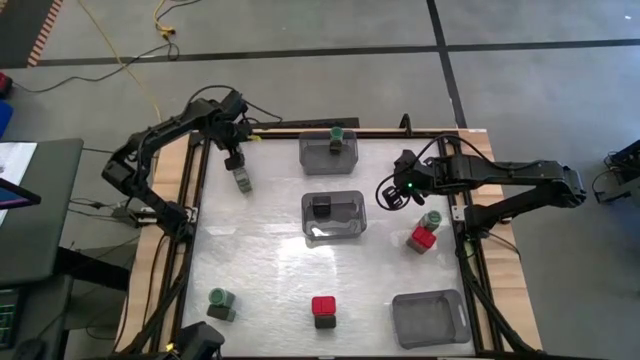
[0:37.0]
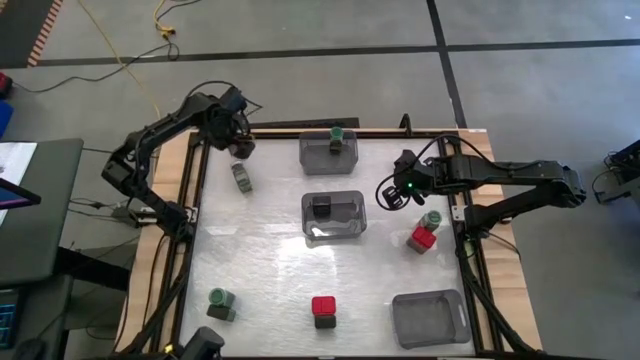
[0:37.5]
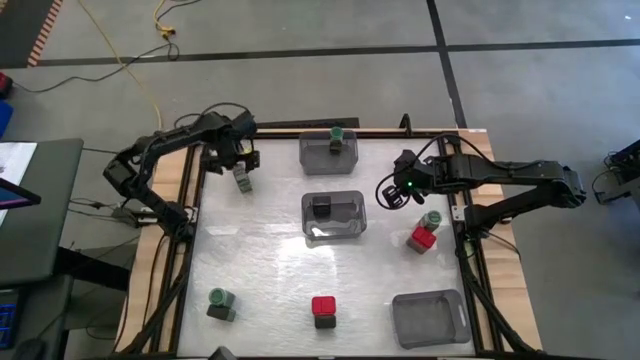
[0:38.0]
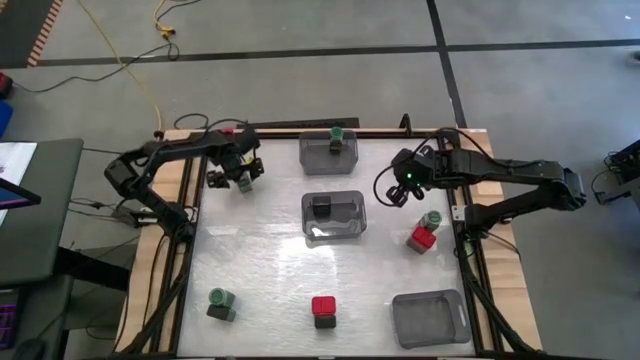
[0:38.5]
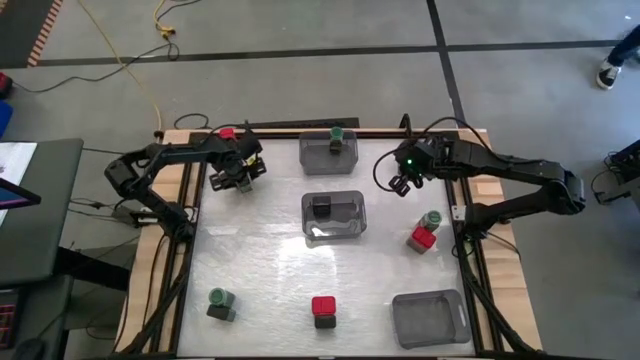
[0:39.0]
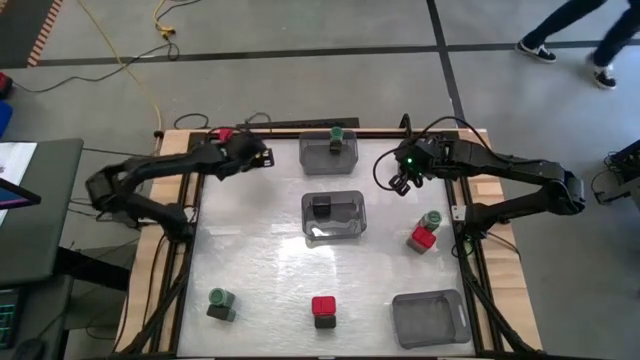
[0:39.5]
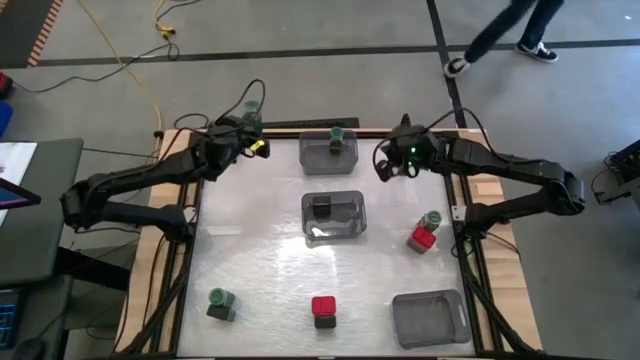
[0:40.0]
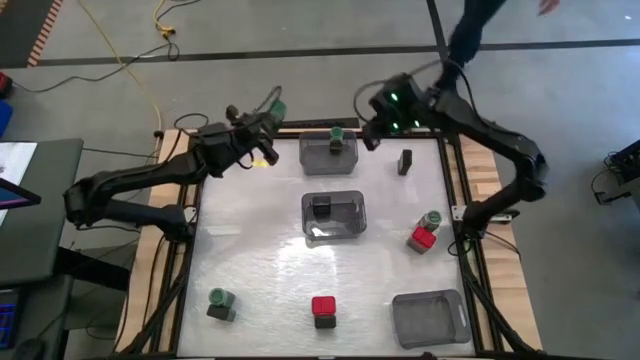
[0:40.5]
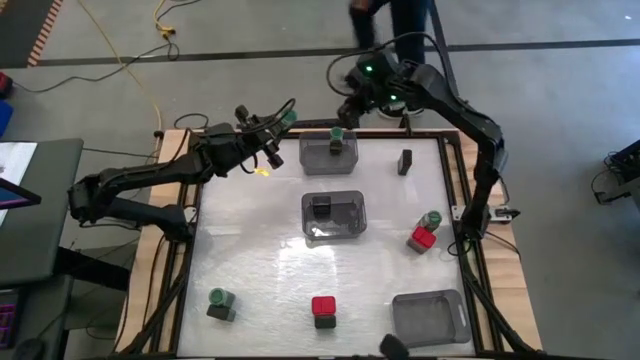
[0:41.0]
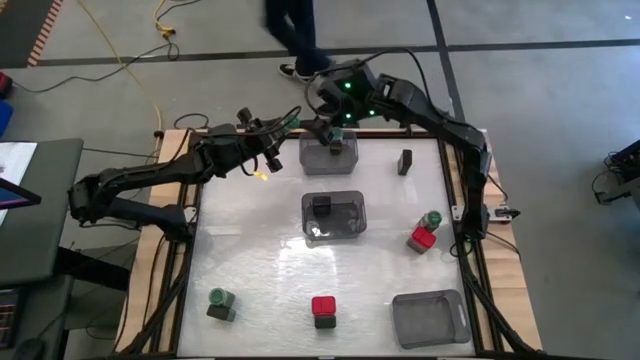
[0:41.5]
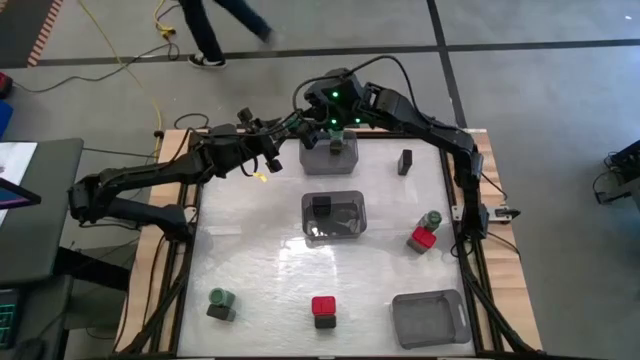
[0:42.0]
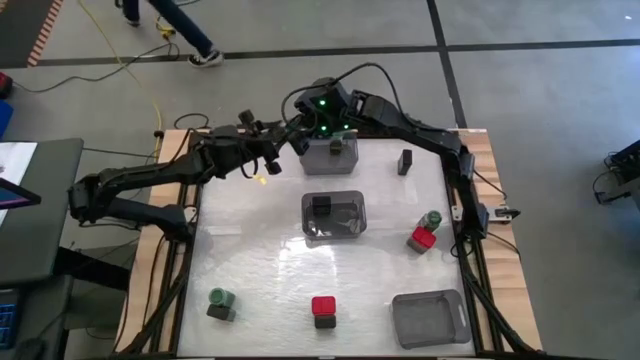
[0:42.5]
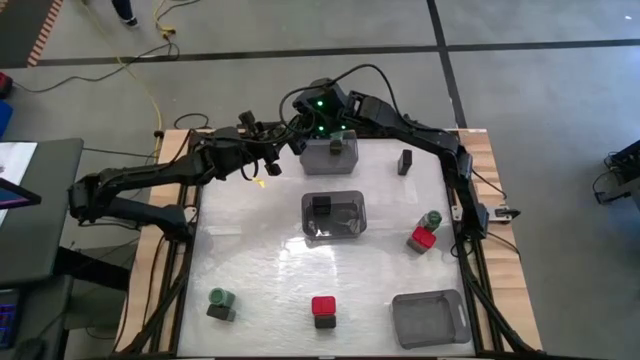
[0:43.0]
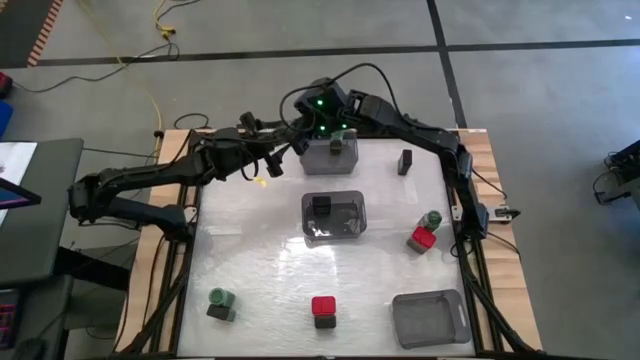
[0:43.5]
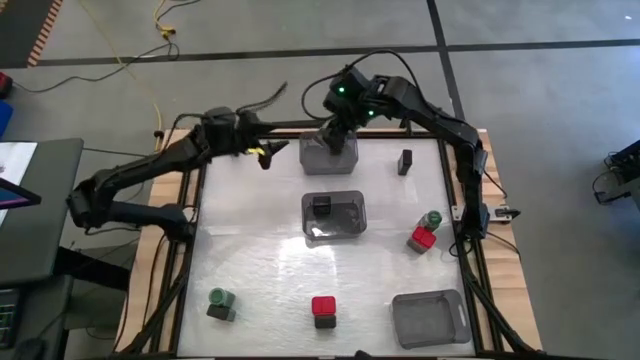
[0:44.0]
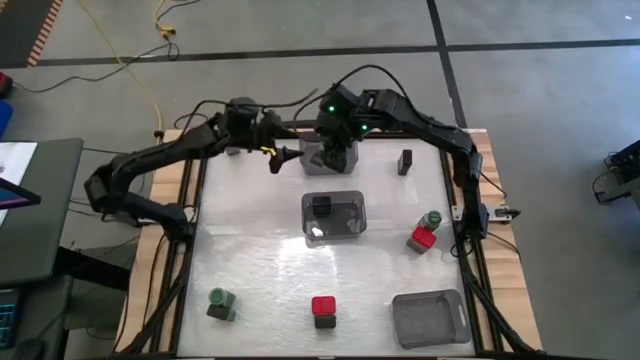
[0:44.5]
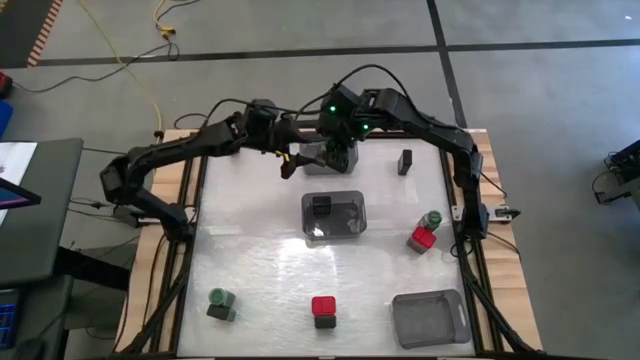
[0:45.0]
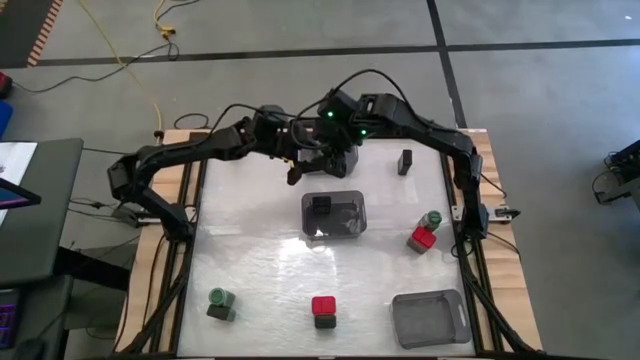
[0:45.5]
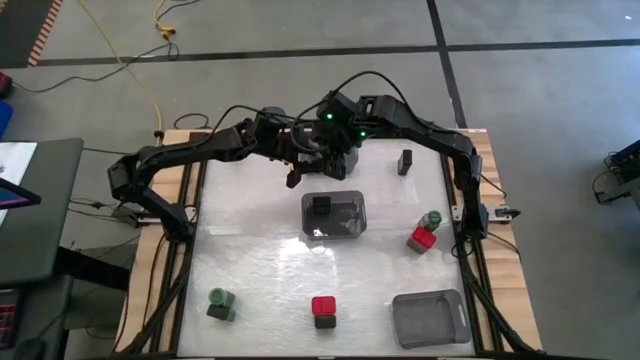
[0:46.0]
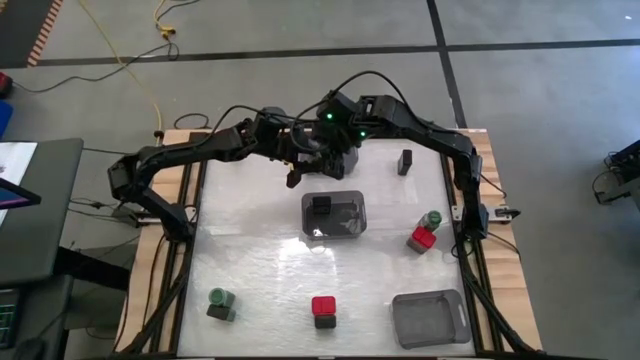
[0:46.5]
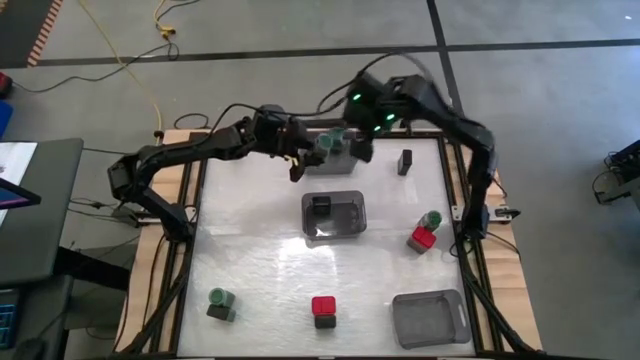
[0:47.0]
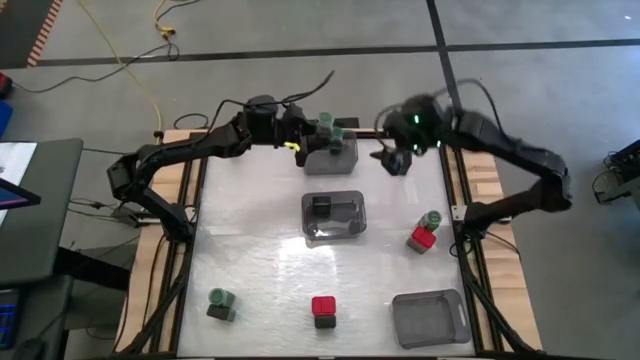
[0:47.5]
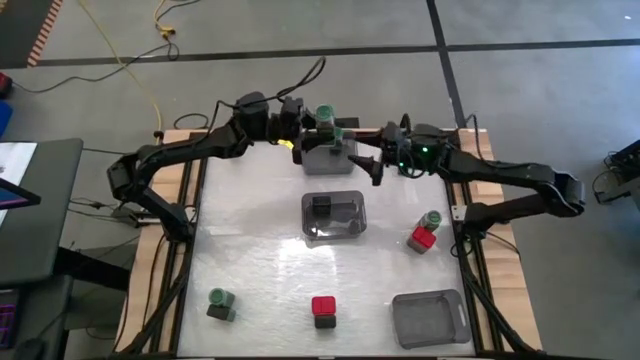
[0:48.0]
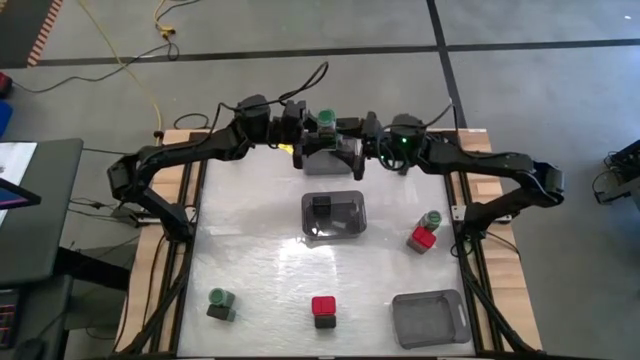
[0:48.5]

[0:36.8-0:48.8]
Task: Sort spices by type
Put the green seasoning bottle into the top black bin

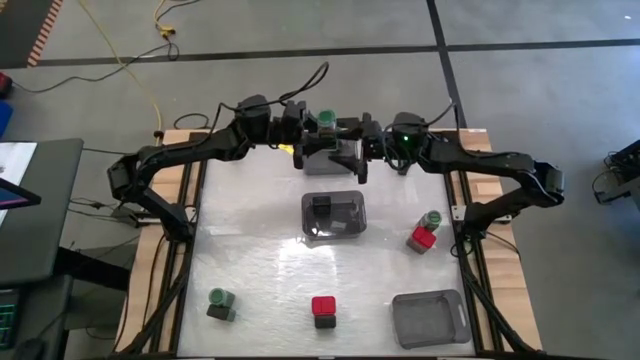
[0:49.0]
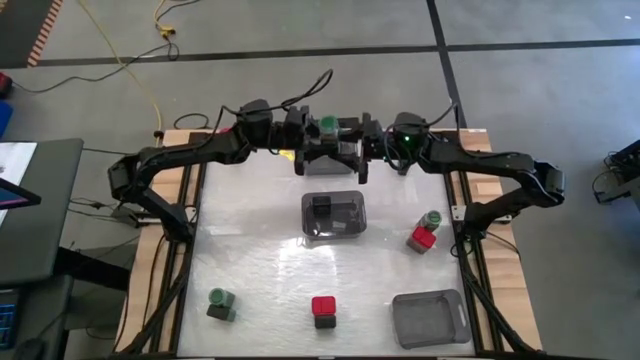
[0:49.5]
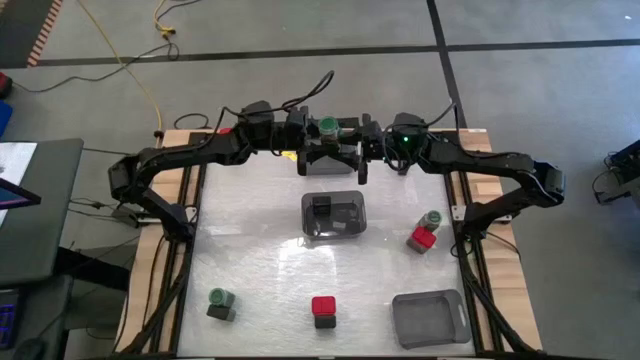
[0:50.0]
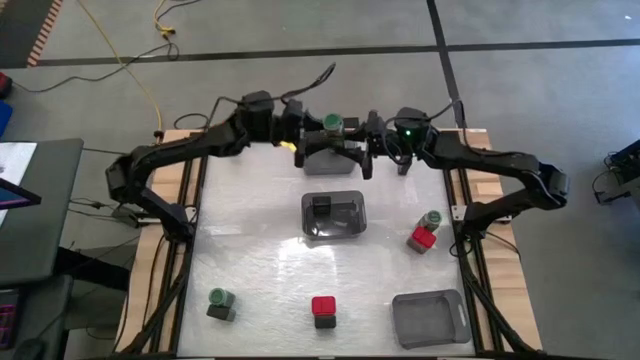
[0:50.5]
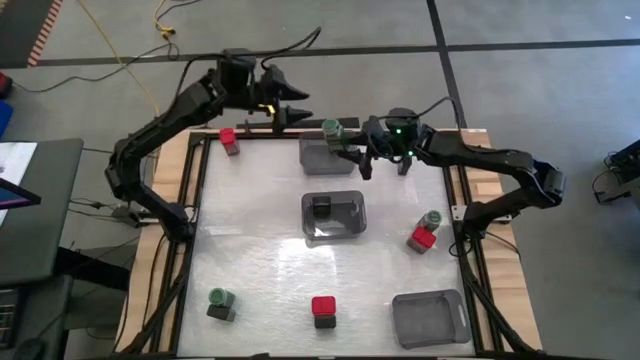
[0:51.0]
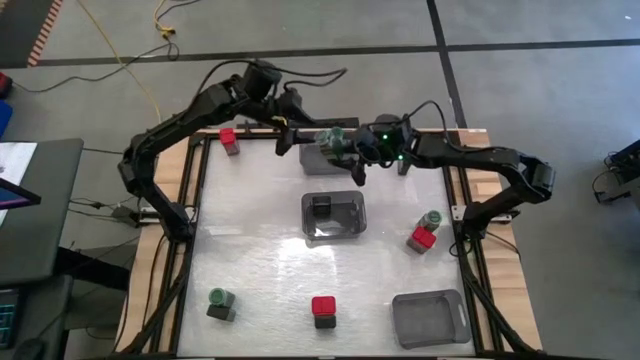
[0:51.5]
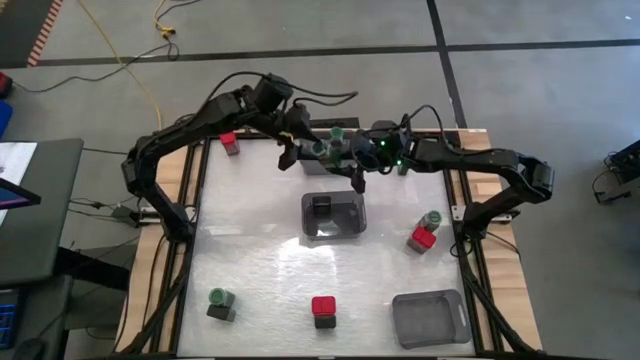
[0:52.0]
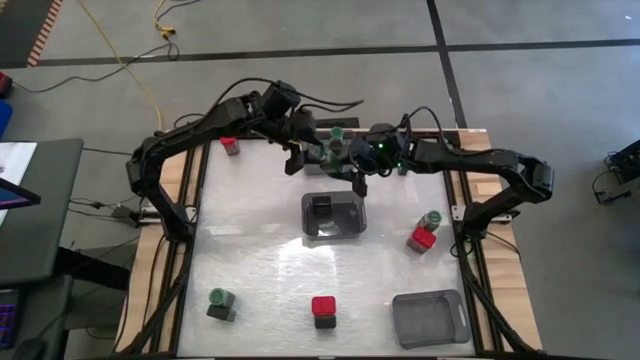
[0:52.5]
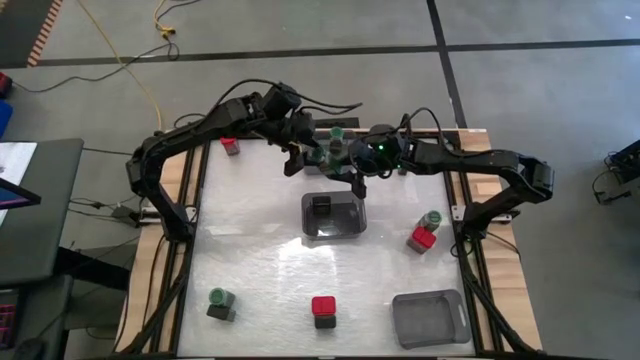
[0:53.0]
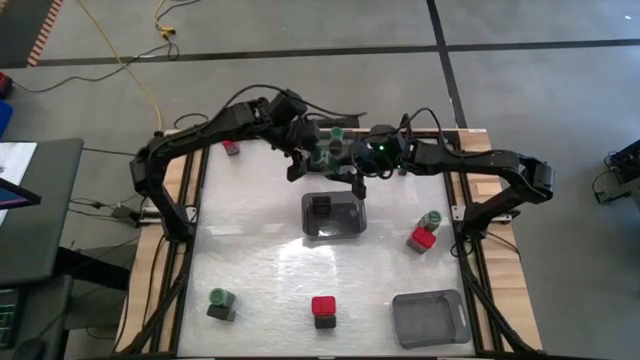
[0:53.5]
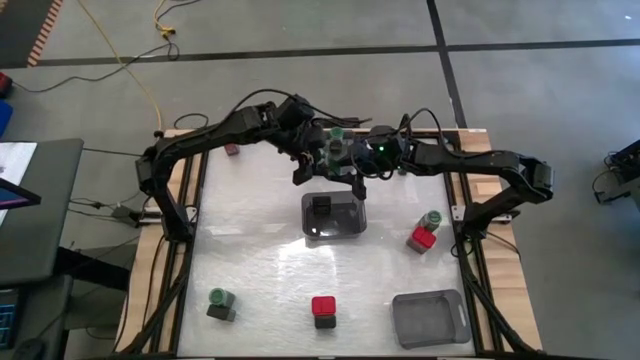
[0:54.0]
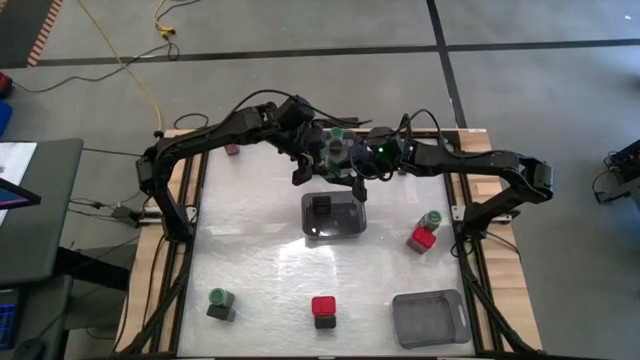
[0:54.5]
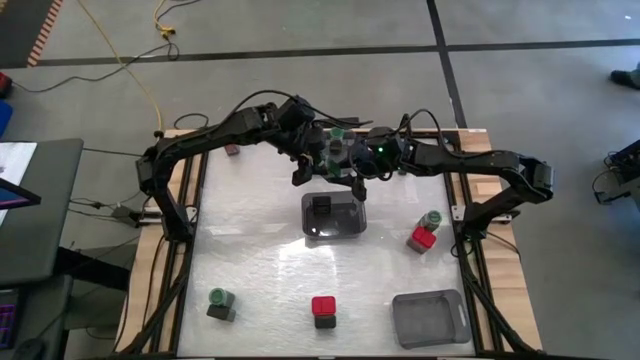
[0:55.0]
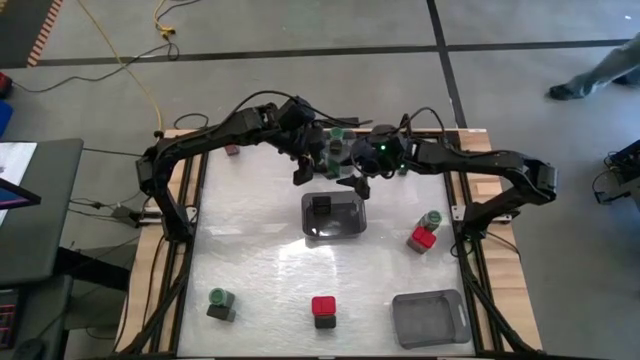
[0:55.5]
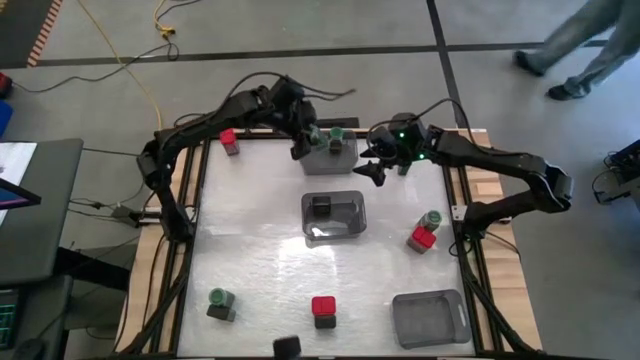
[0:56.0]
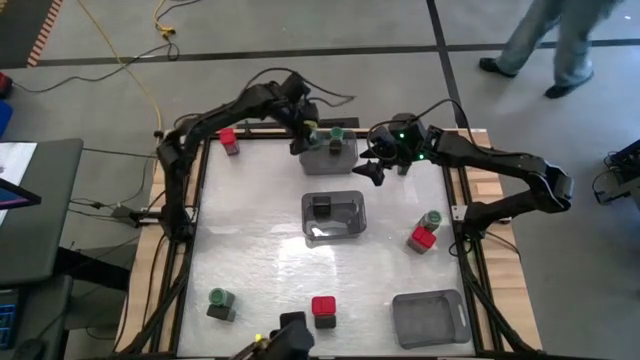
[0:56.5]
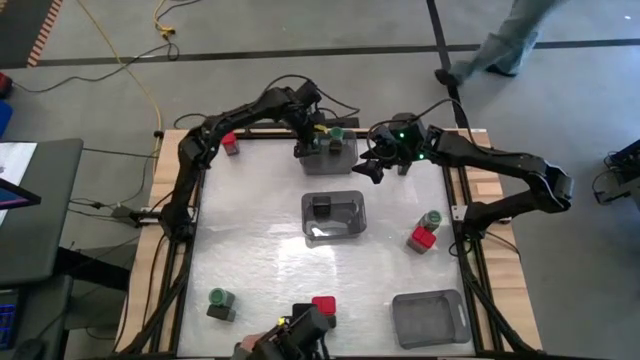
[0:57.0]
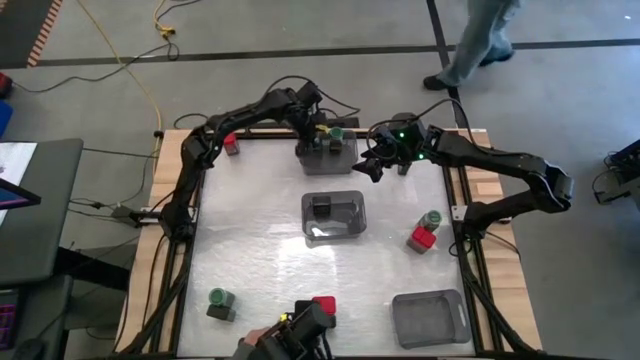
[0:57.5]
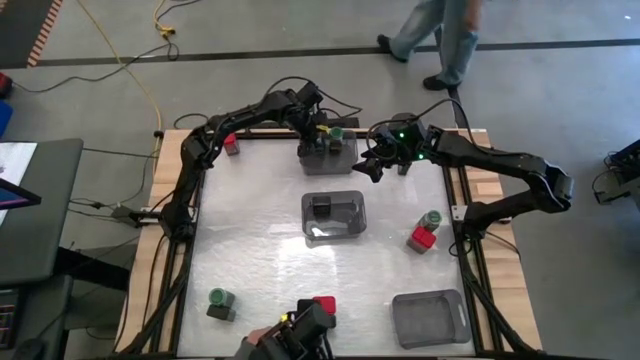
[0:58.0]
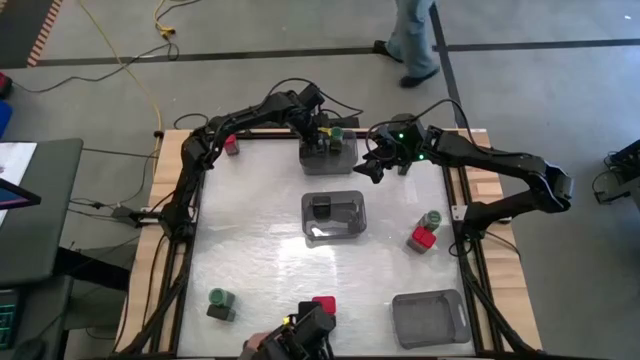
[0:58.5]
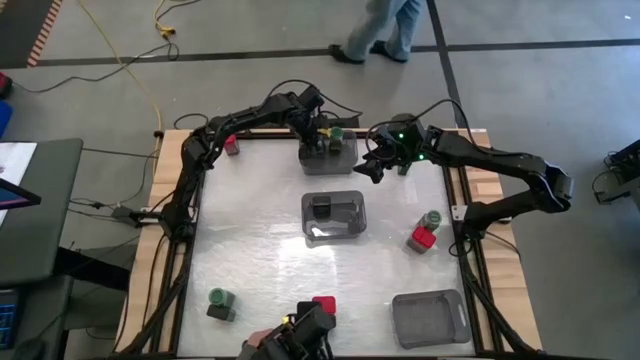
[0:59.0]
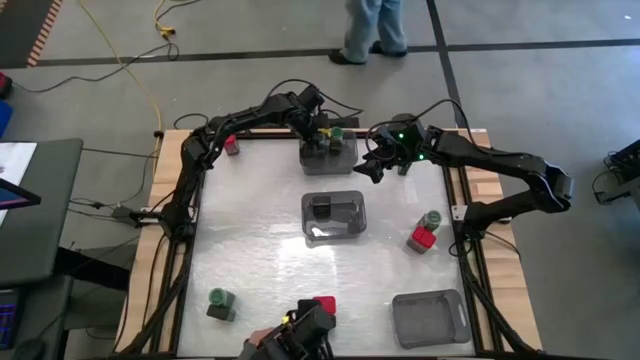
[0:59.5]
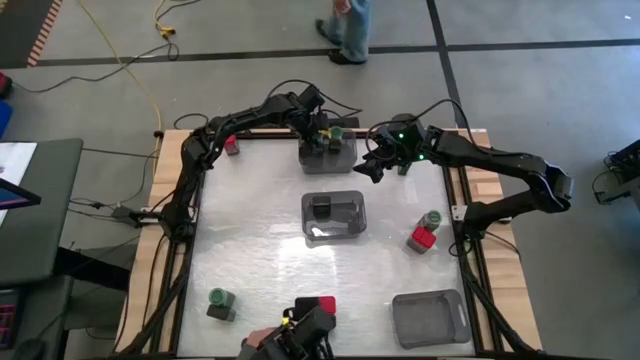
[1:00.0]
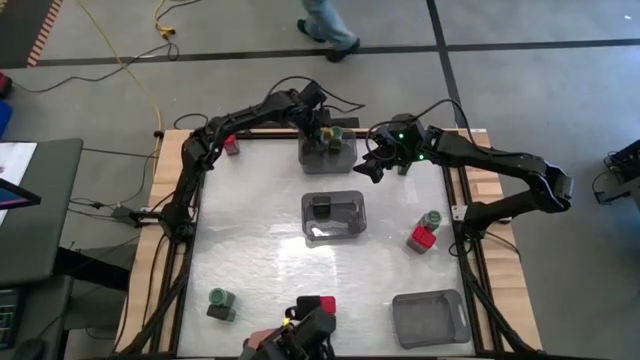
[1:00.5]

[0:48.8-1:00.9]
Put the green seasoning bottle into the top black bin
